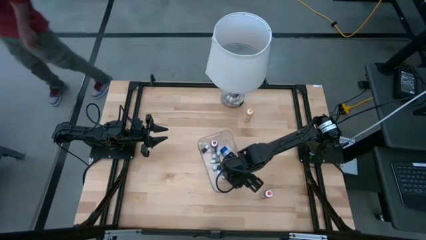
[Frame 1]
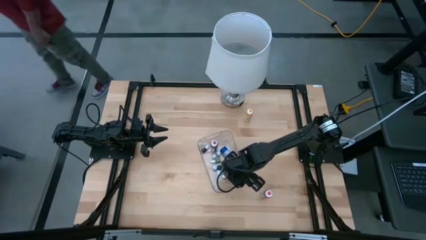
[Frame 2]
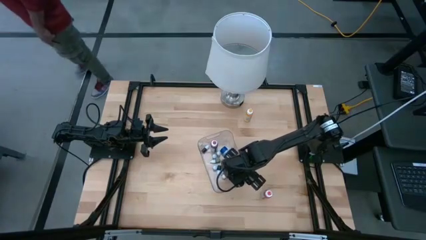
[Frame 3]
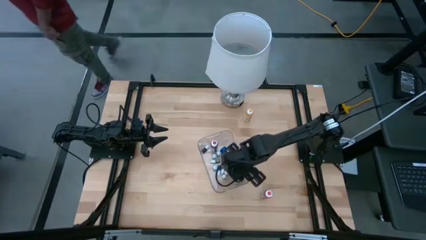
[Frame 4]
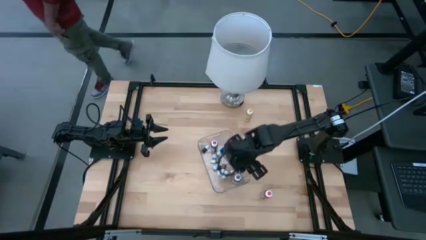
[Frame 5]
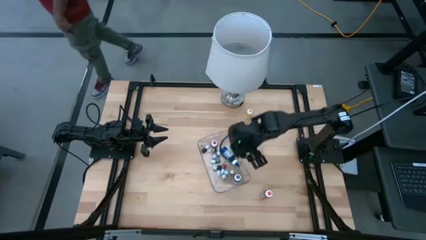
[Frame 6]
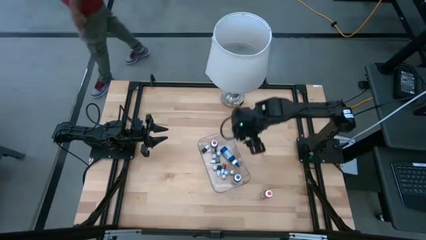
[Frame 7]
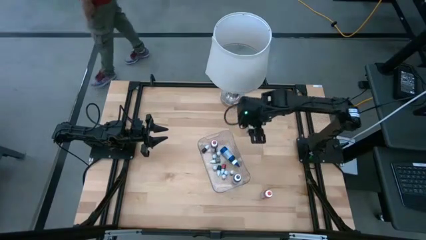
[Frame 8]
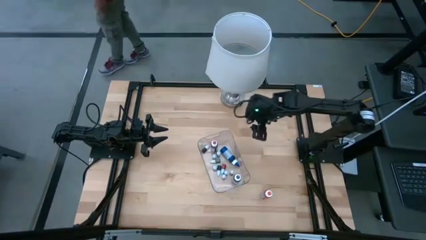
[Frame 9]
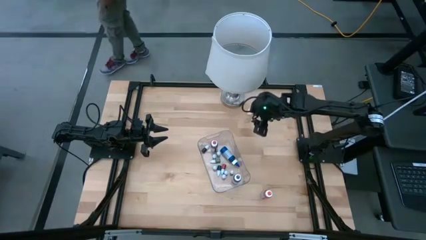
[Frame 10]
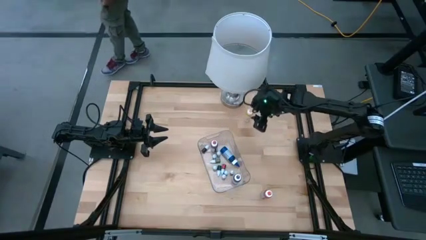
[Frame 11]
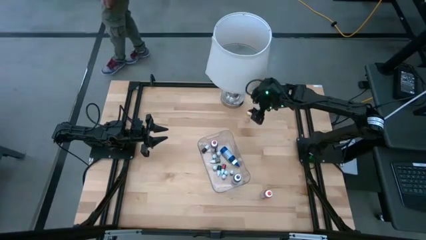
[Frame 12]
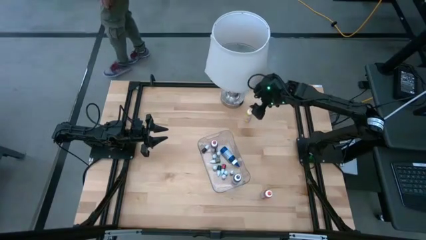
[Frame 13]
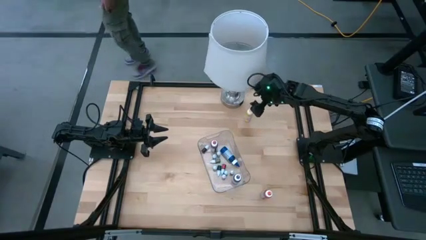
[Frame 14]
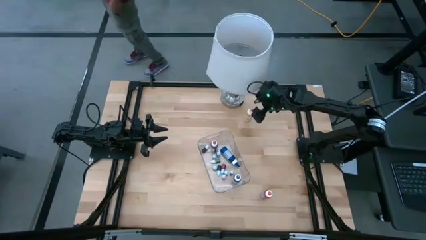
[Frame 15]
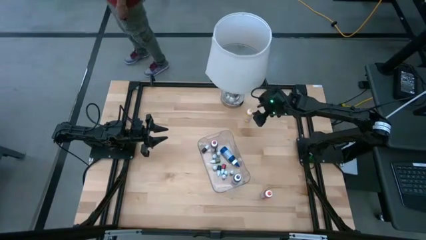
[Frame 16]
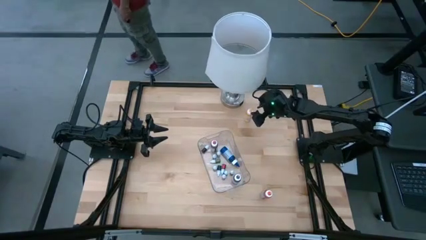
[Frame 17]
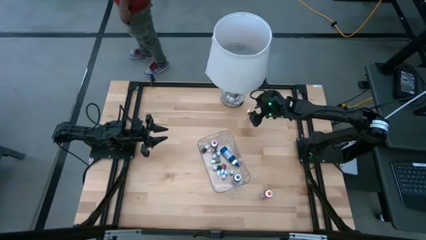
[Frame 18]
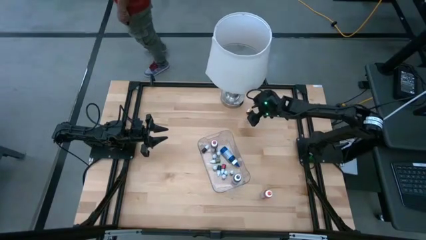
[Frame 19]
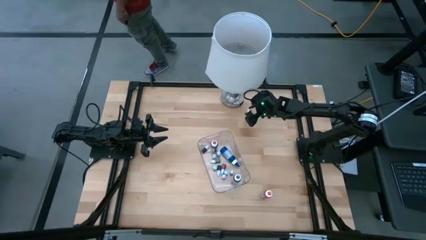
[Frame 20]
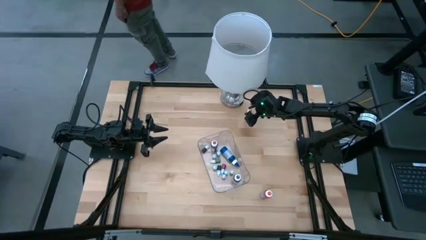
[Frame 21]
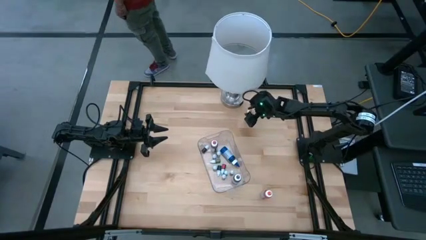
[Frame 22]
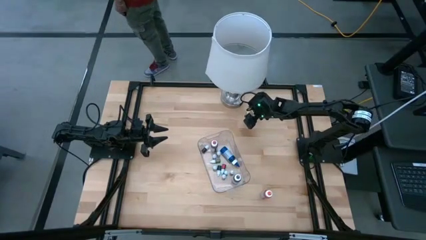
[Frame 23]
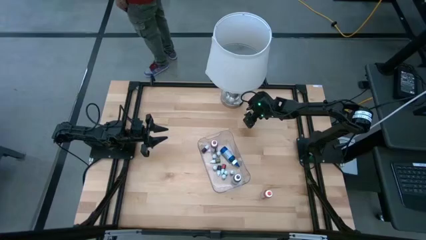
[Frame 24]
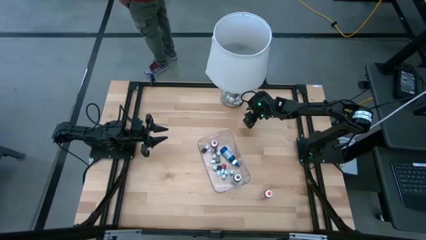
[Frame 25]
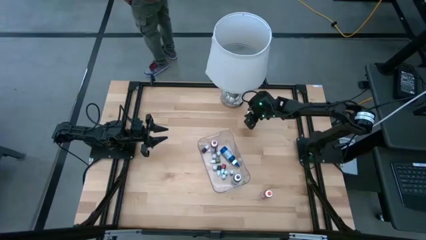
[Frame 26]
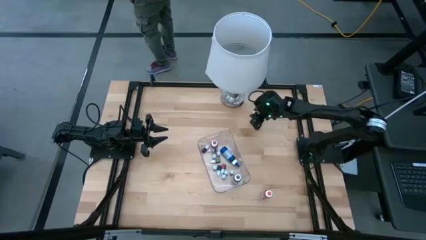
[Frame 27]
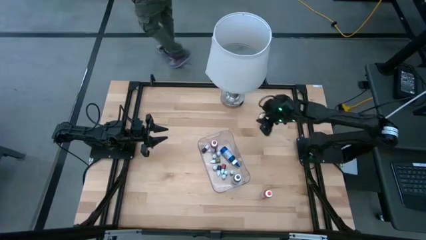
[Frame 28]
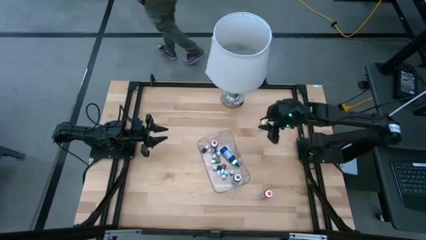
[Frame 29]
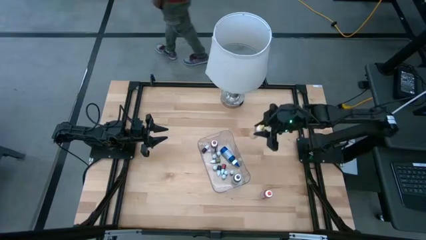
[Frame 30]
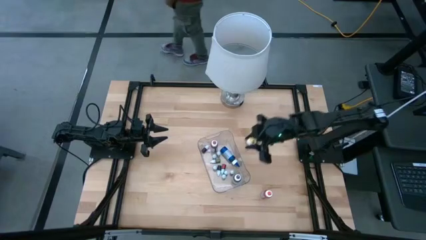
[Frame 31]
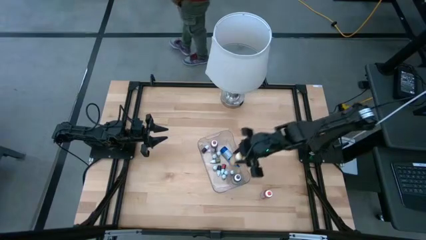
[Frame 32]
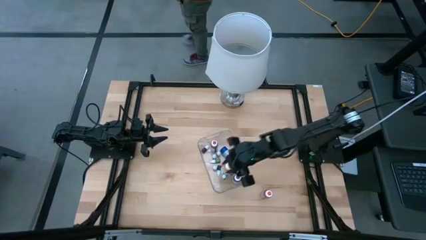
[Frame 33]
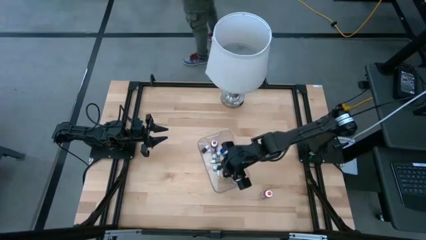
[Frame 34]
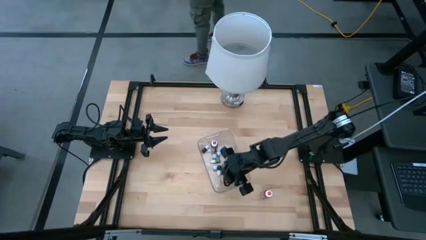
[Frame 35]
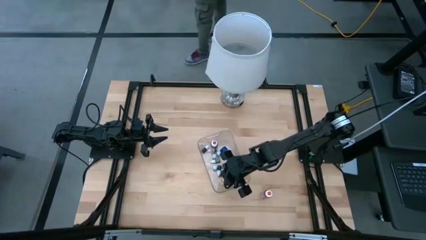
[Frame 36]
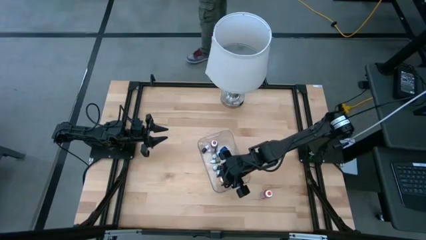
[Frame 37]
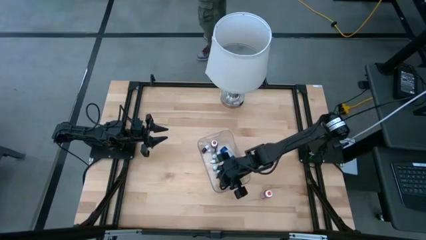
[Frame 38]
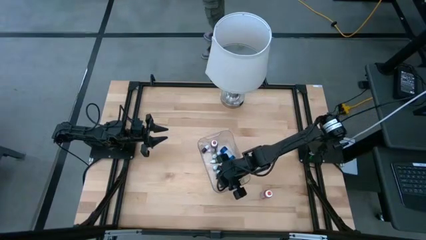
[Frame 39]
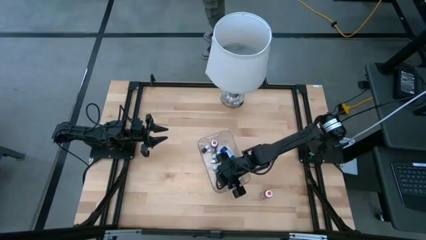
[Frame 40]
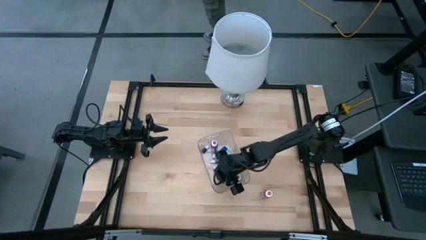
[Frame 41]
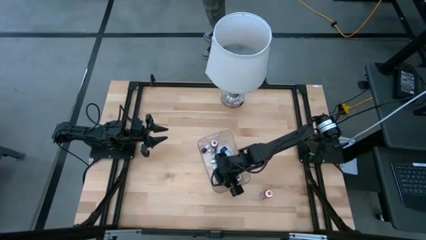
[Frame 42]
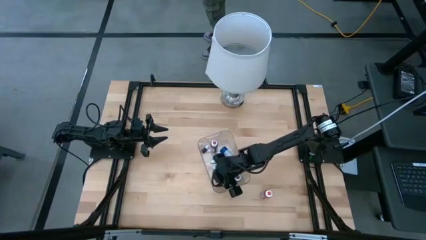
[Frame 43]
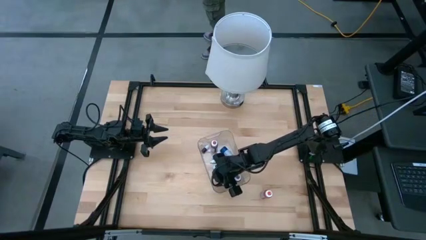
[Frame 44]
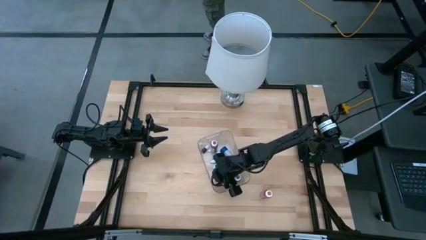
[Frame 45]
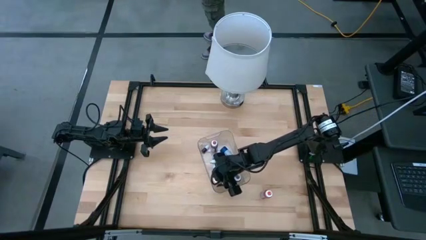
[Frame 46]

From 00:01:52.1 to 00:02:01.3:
Task: Pick & Place food coloring
Put the big yellow food coloring bottle into the transparent bin

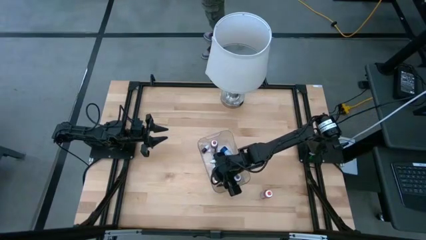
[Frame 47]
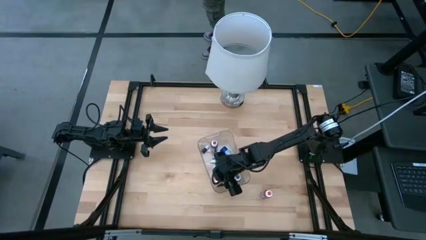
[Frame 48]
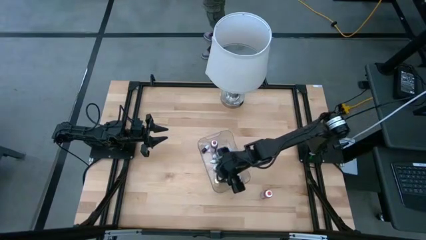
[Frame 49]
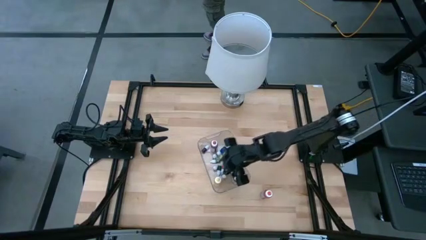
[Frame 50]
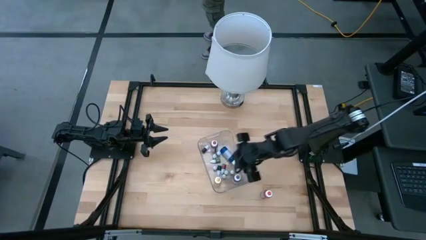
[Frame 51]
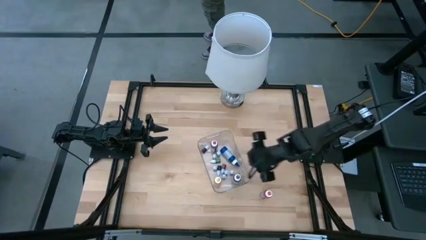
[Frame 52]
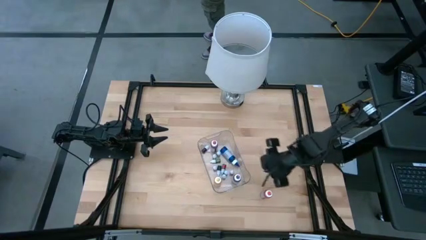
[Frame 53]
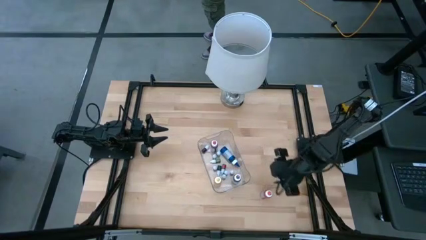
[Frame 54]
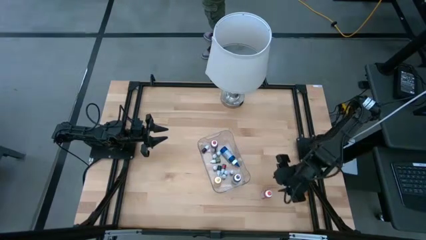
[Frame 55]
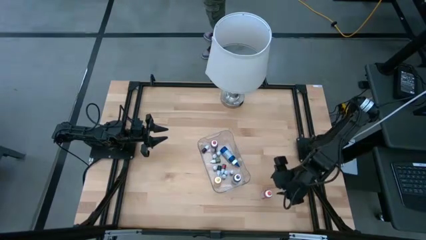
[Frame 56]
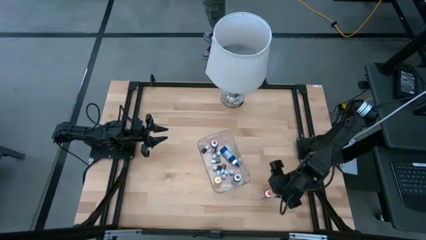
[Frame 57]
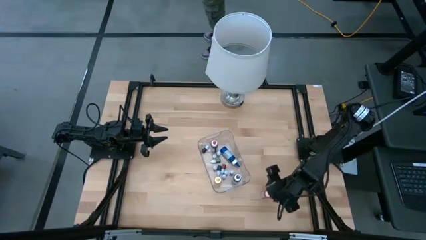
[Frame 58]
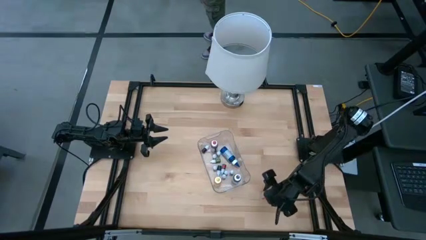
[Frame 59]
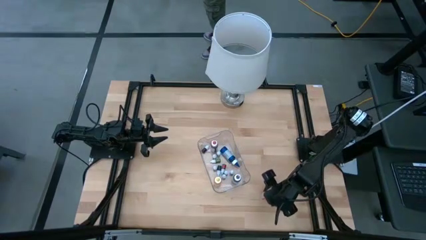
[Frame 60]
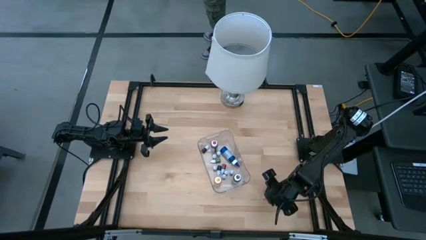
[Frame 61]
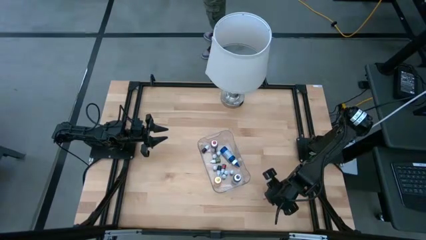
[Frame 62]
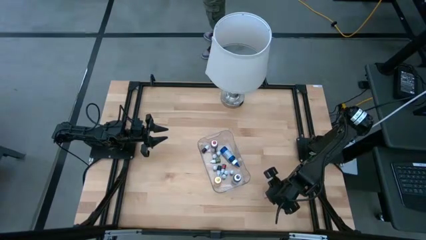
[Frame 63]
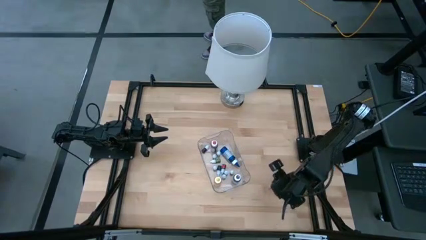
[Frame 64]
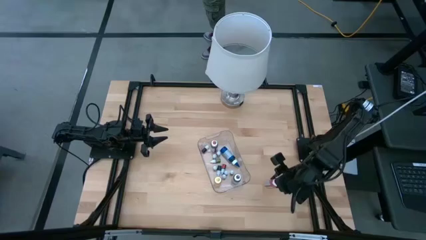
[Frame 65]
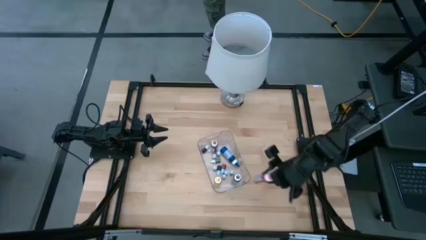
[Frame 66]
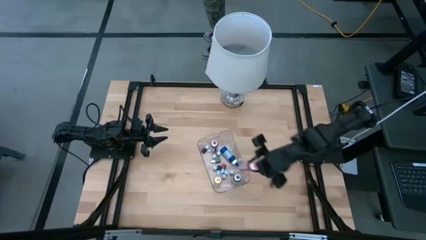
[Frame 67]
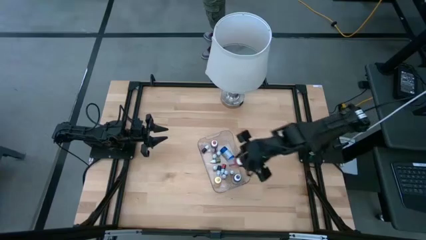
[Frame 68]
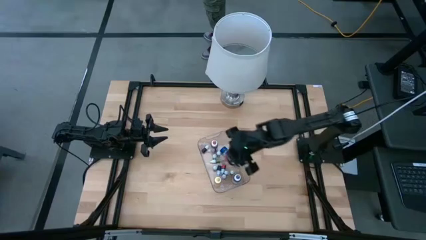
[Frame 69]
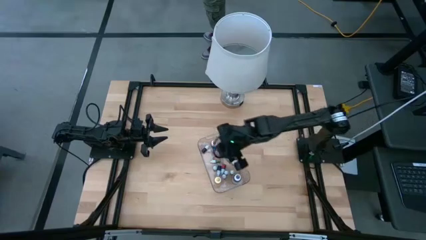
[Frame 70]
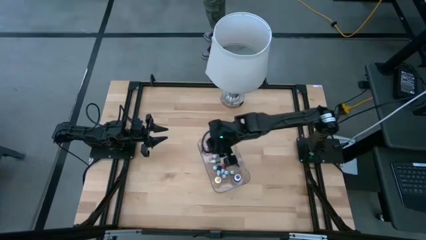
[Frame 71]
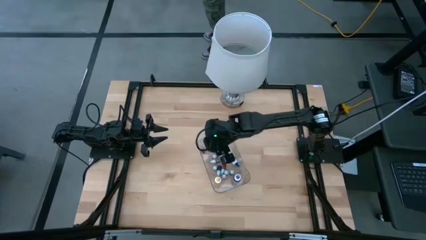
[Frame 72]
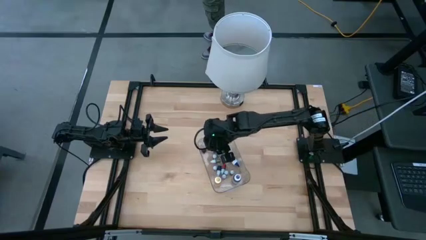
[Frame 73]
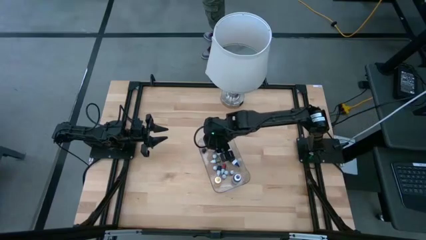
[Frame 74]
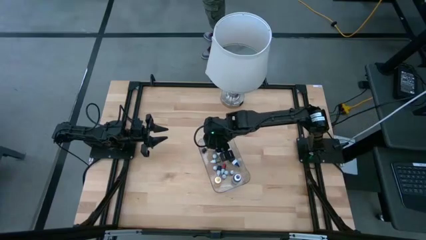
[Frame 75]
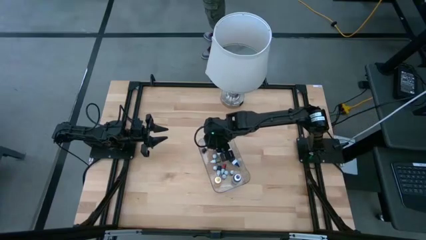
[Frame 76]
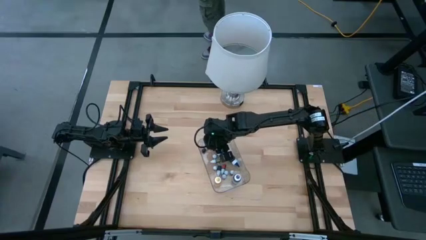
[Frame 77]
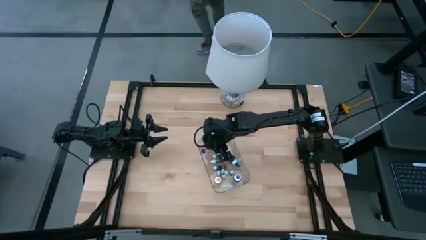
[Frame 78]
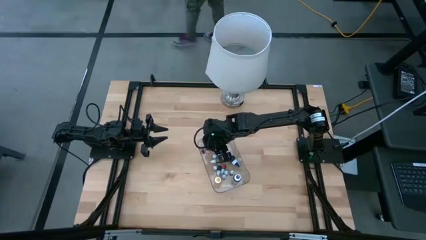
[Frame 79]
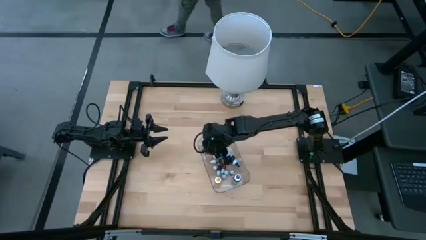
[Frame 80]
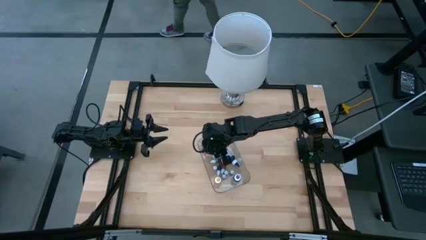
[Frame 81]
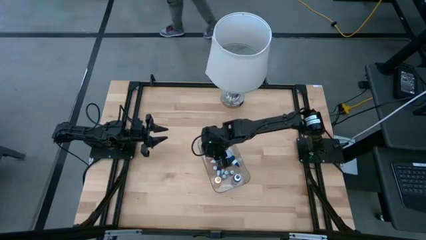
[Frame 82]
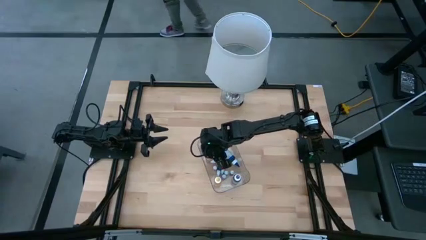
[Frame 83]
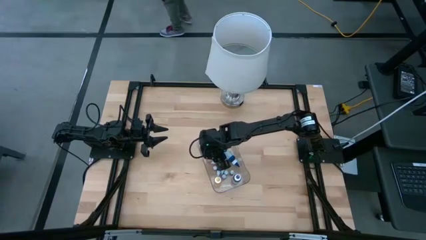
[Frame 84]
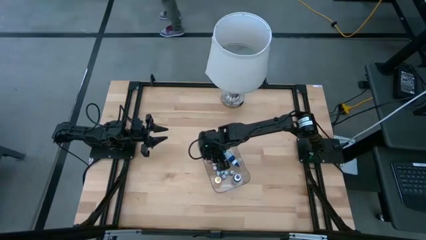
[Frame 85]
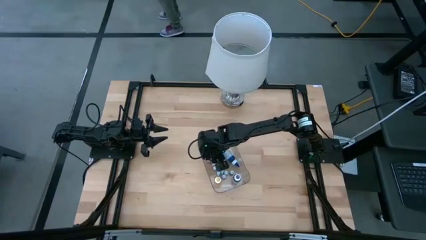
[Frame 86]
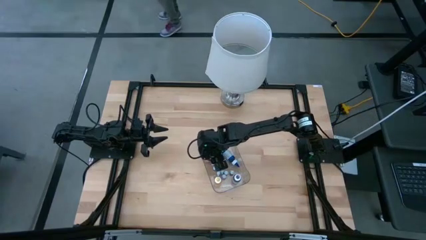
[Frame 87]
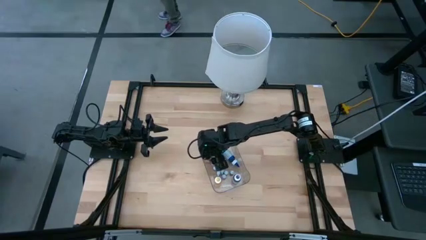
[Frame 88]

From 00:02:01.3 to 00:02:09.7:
Put the big orange food coloring bottle into the transparent bin
